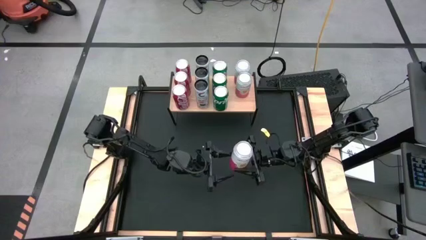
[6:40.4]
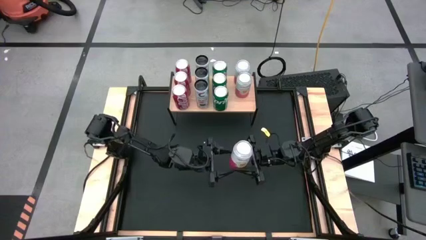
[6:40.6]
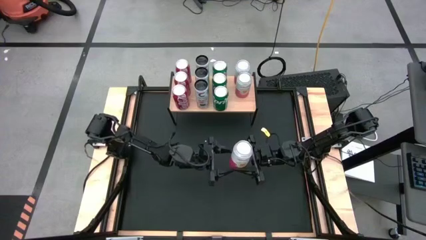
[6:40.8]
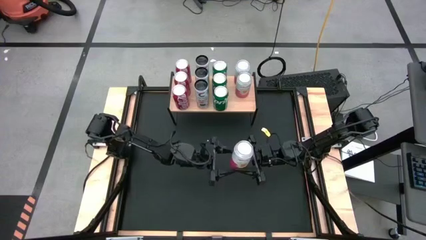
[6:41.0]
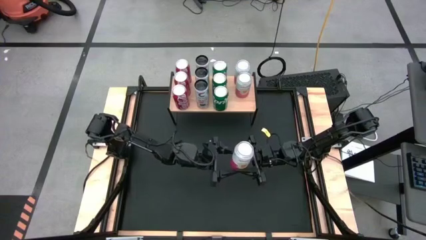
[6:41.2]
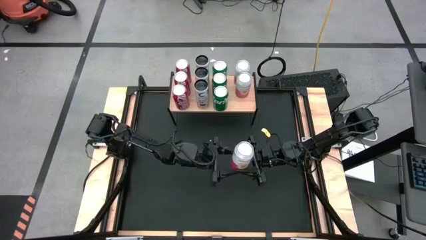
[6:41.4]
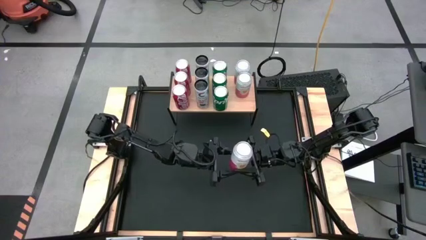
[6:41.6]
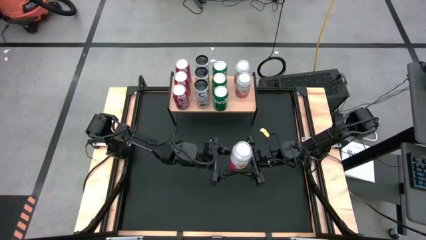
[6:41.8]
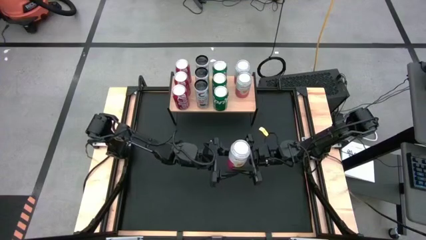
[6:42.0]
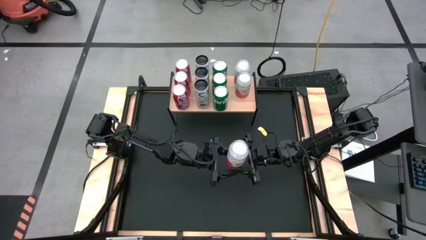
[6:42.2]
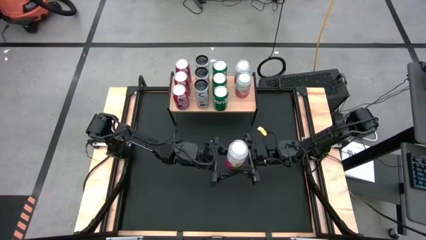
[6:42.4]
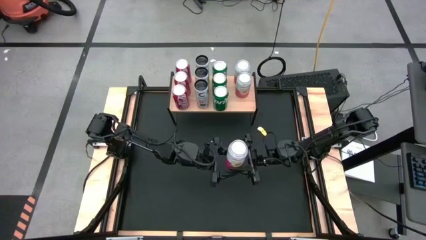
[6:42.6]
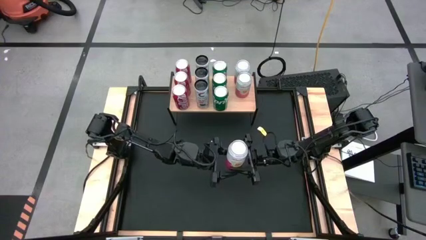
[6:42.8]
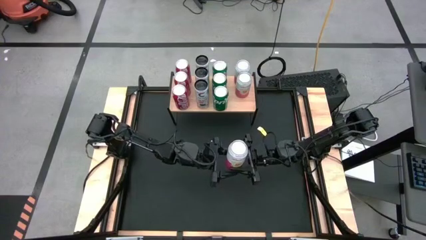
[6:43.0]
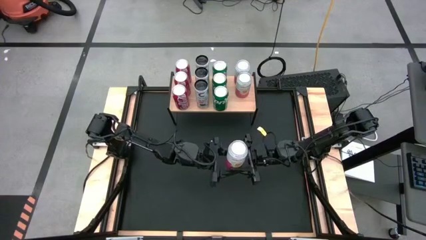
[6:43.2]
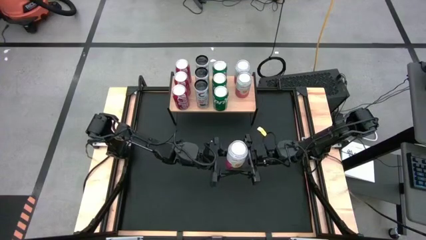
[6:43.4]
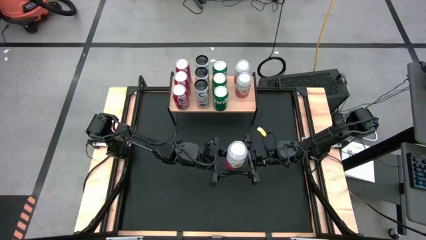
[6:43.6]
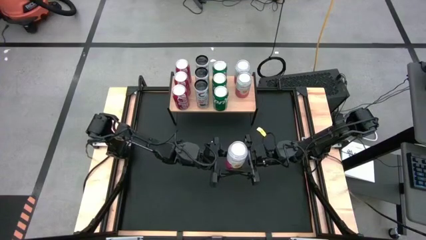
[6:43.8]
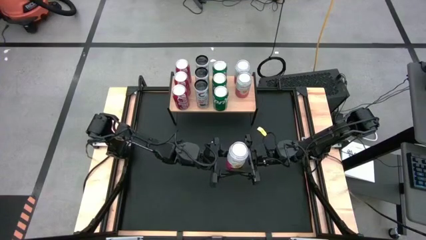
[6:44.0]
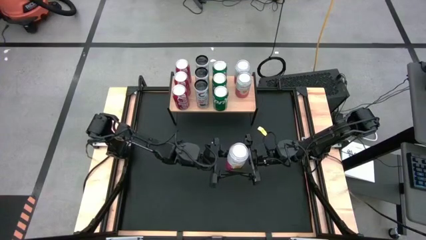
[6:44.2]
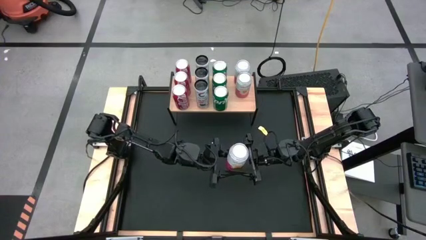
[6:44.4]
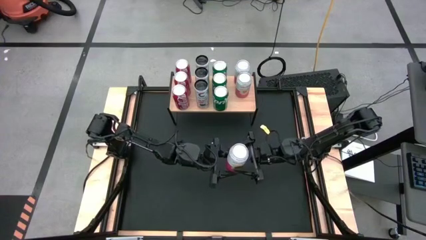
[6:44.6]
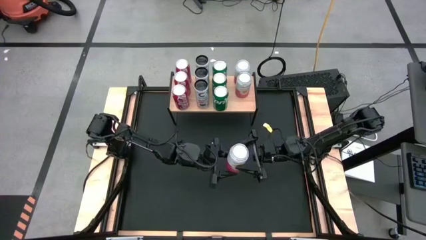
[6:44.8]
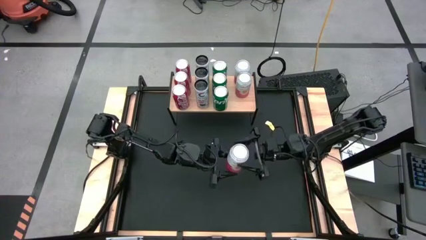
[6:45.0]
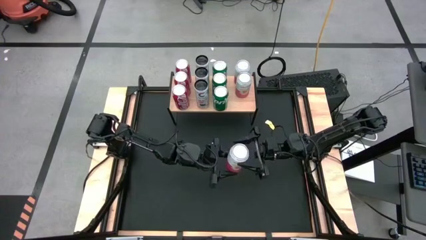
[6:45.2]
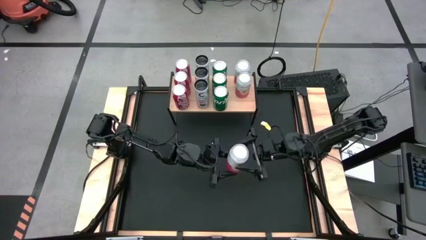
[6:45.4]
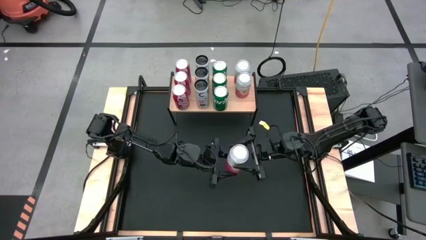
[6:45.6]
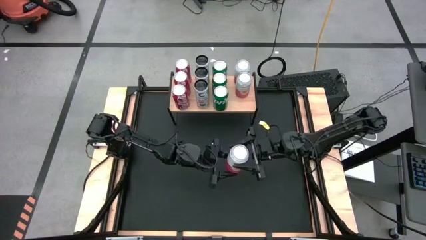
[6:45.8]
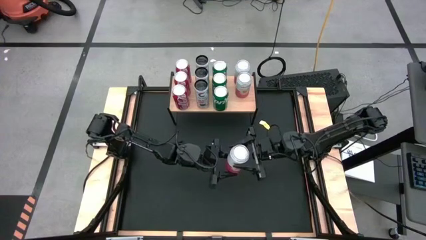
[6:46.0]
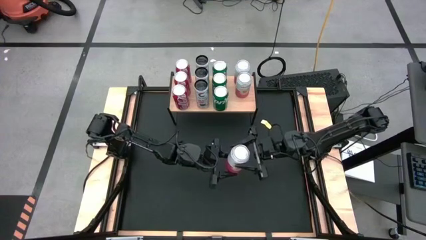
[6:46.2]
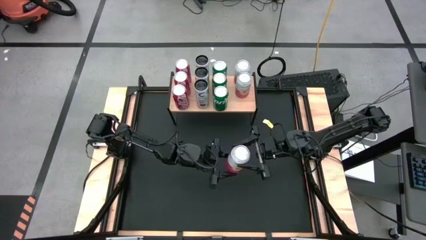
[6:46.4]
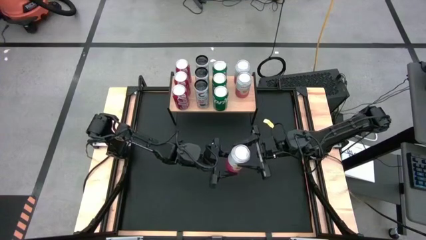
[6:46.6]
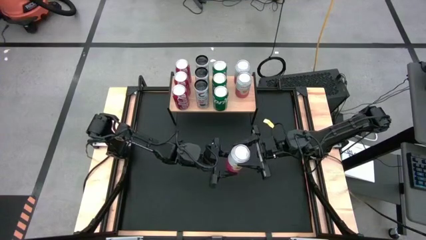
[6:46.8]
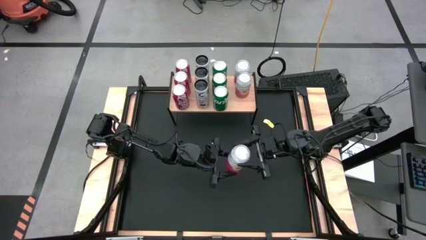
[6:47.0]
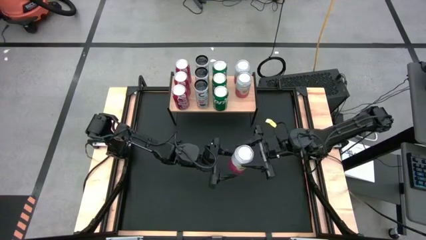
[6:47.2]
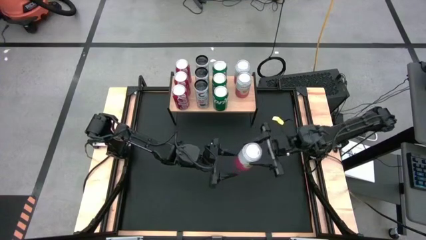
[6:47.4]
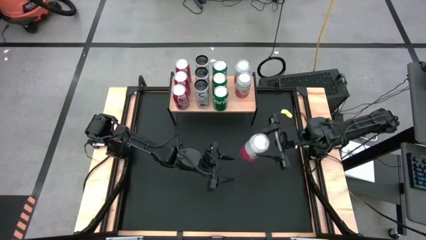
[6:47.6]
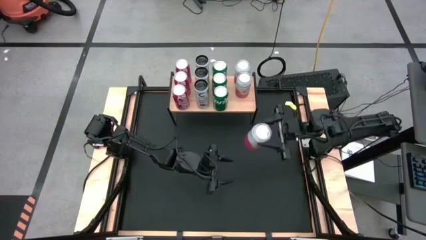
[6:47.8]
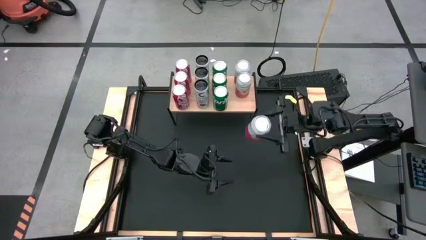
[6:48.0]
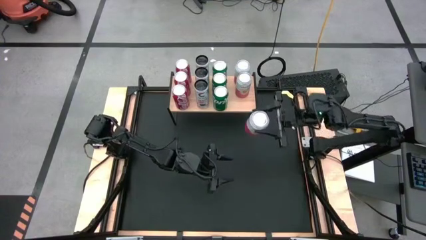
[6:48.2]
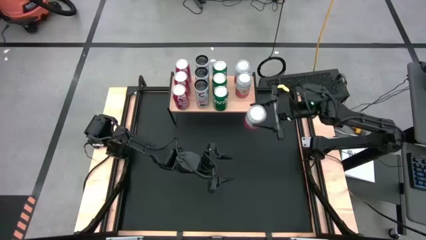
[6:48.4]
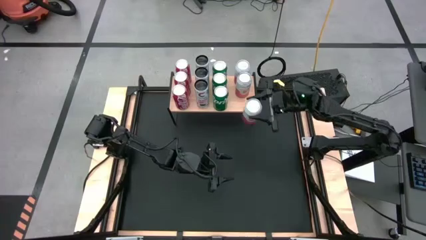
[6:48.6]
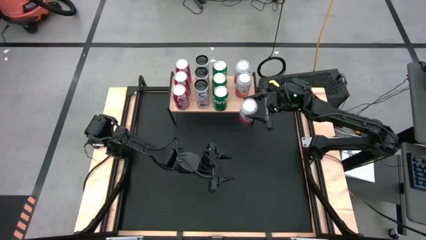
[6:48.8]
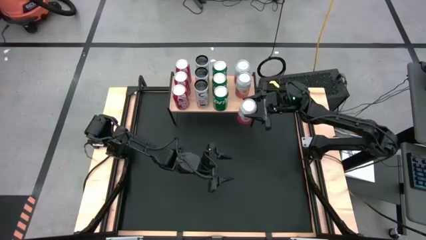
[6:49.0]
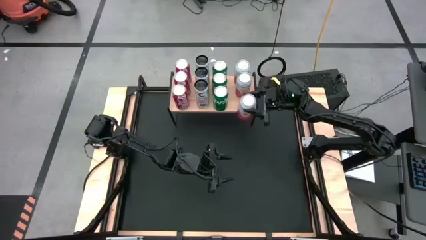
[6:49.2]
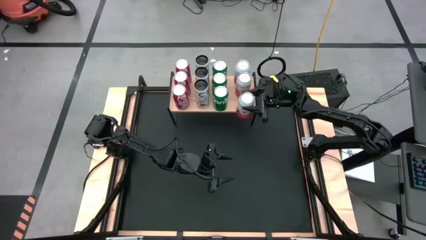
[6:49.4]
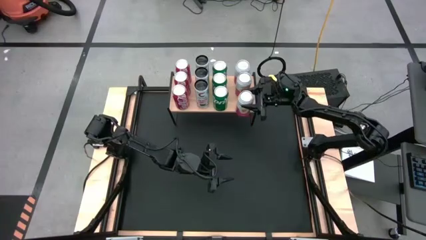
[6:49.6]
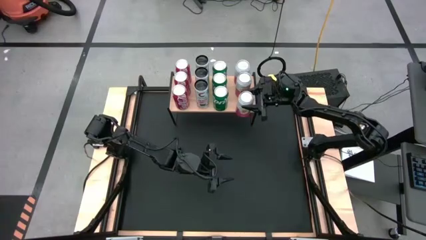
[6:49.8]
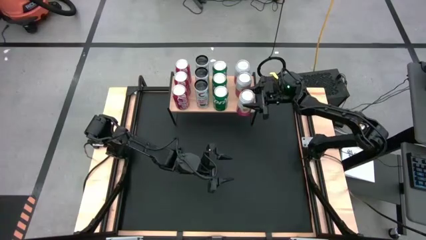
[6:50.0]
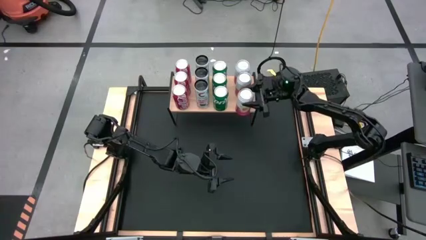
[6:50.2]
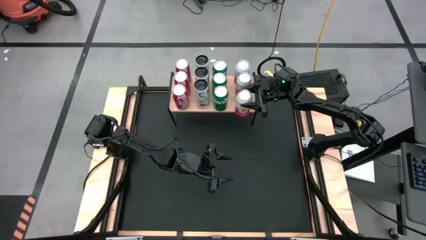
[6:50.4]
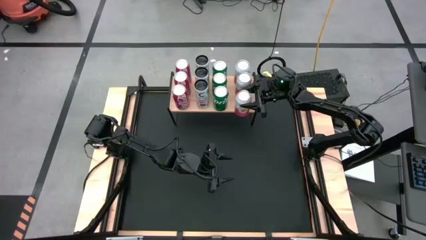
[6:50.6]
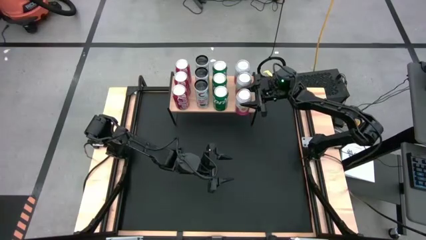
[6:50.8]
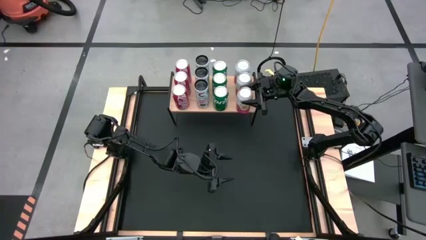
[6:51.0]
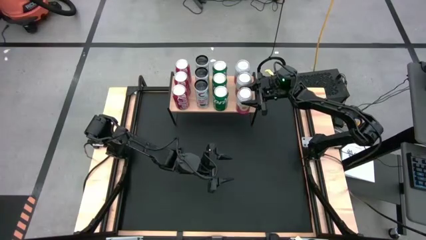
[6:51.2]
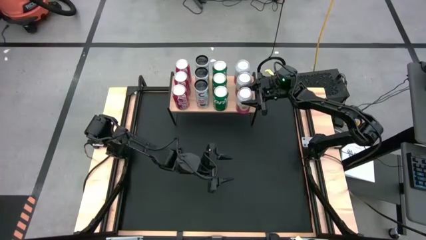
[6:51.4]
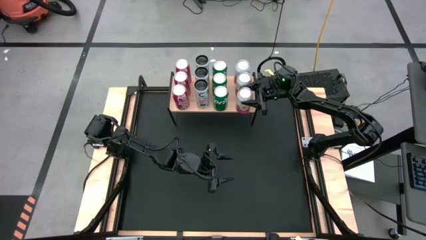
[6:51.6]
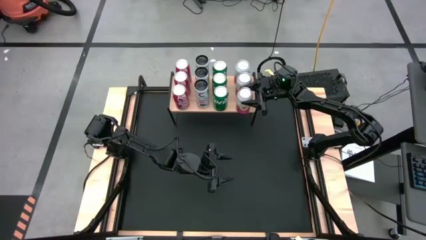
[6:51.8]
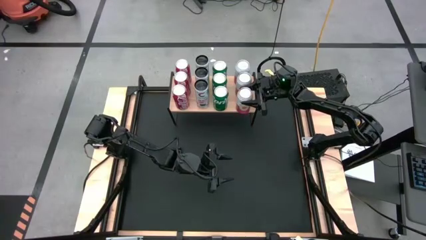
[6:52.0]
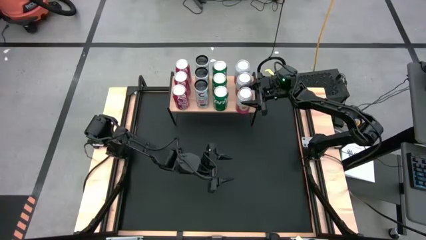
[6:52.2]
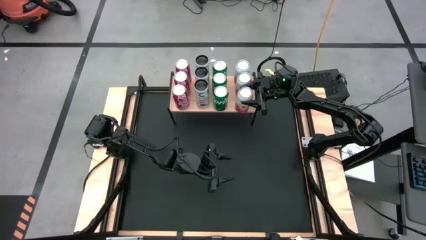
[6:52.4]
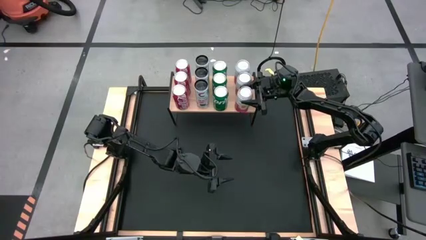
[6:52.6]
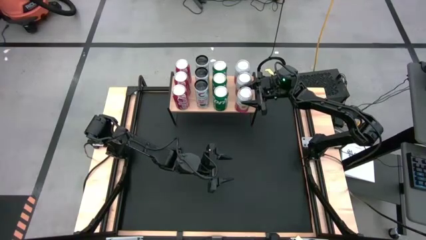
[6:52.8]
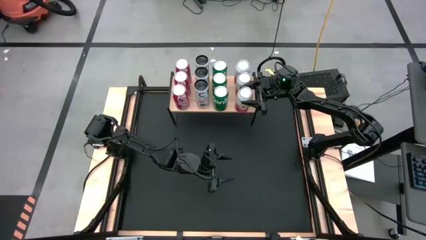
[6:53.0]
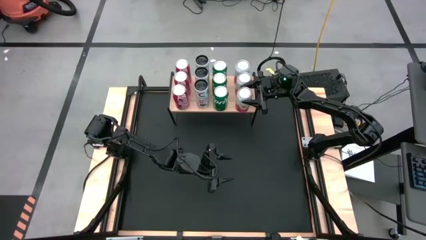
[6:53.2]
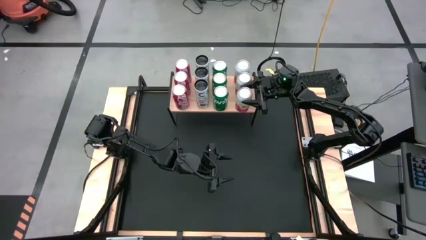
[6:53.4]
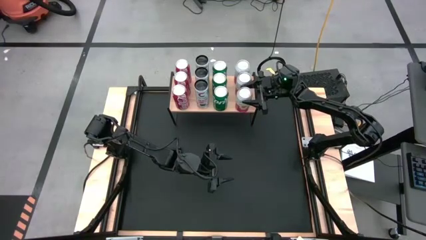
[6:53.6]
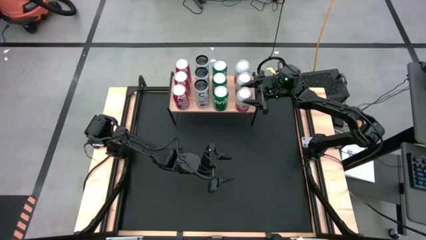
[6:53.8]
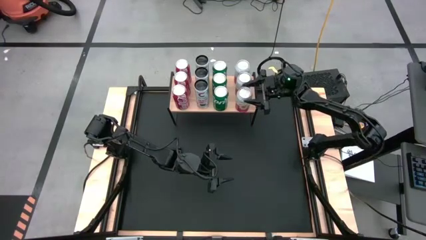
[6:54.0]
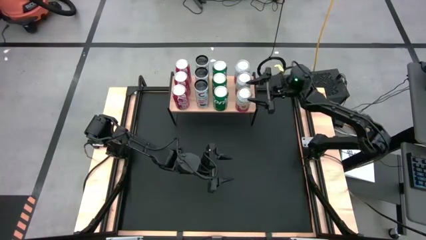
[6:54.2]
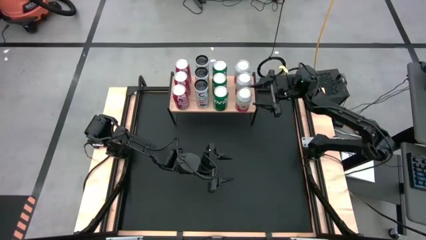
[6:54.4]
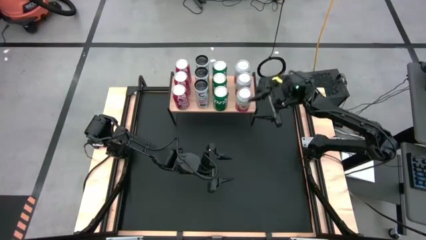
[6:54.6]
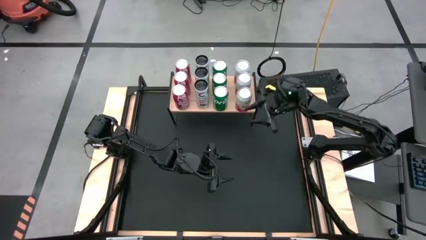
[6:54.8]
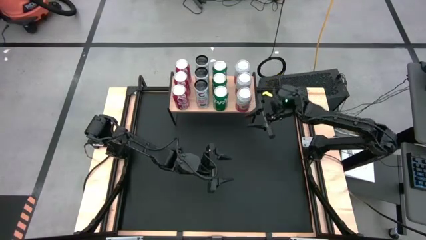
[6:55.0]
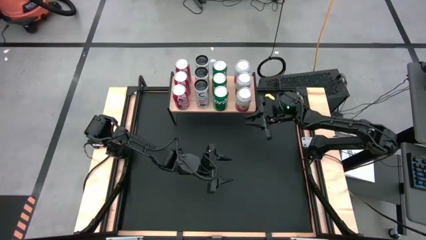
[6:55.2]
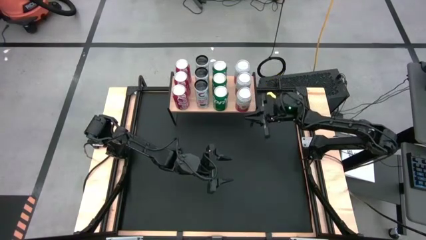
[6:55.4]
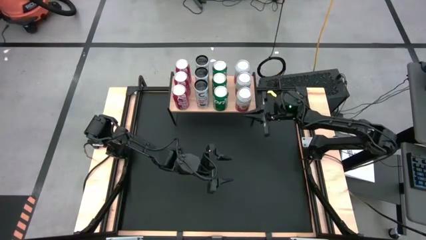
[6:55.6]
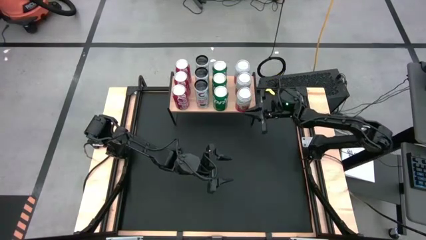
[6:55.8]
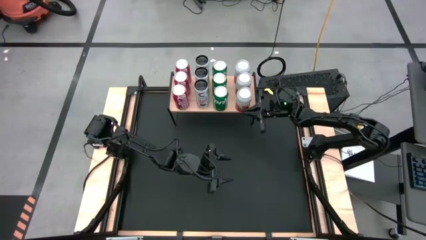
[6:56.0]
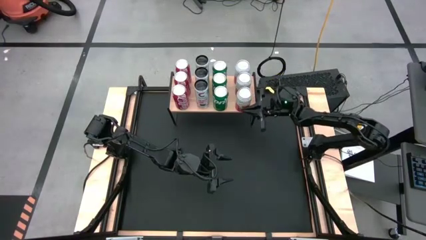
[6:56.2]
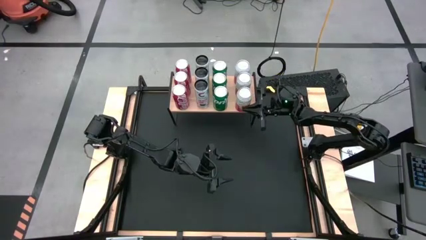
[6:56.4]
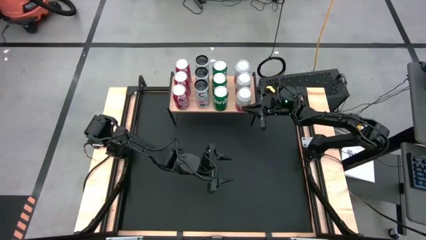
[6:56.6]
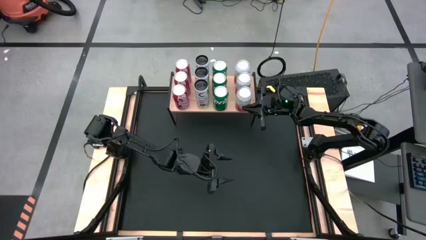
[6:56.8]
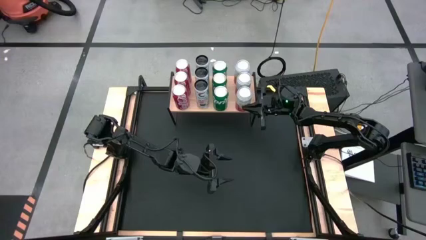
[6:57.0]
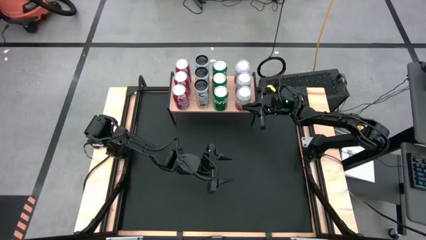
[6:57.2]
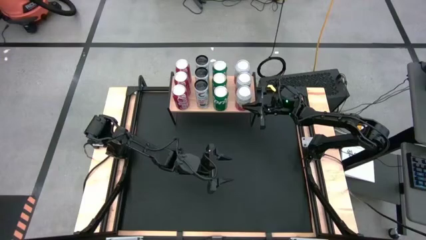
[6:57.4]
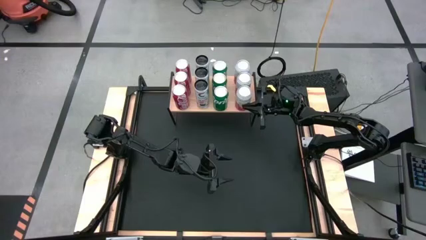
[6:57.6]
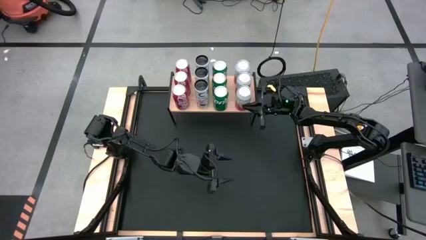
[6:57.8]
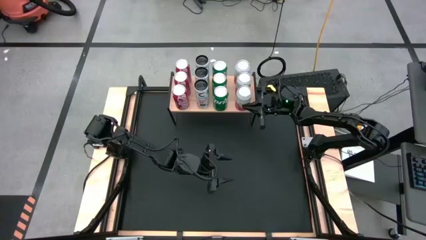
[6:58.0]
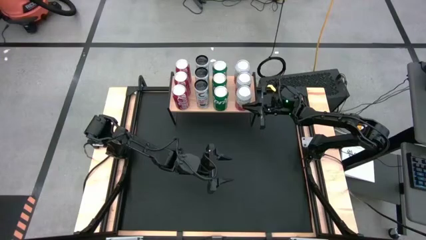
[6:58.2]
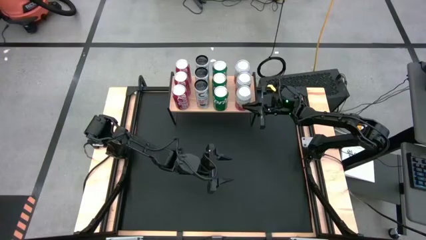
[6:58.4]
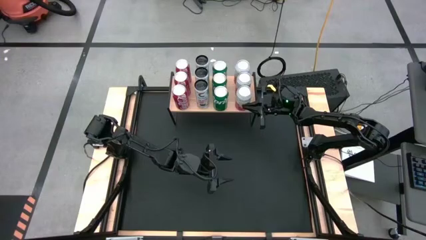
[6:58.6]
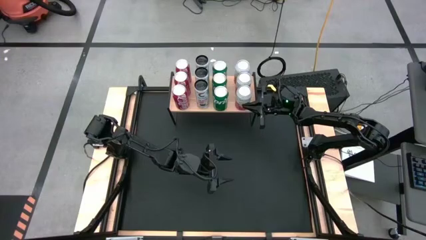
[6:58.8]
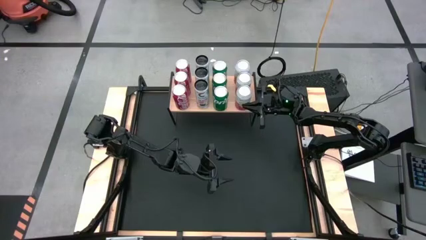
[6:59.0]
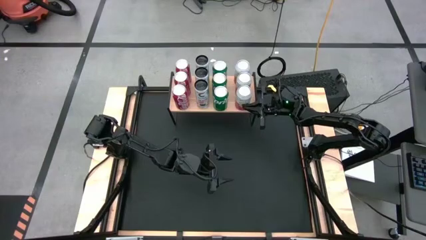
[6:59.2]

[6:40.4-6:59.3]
Task: Place canned beverage on shelf
Put the pink soda can aligned with the other pink soda can on the shelf
